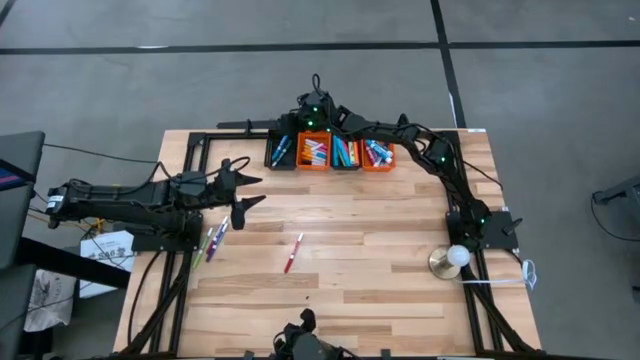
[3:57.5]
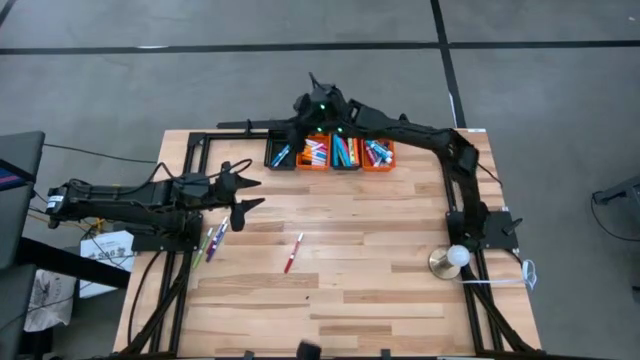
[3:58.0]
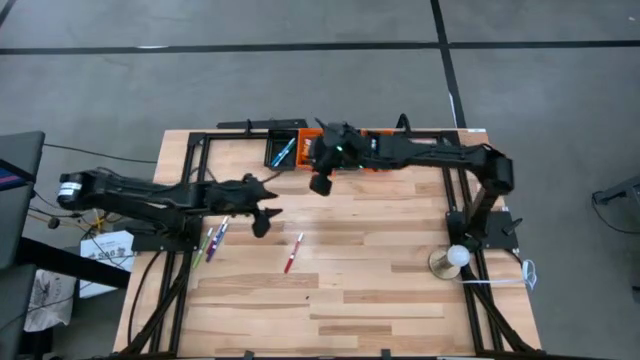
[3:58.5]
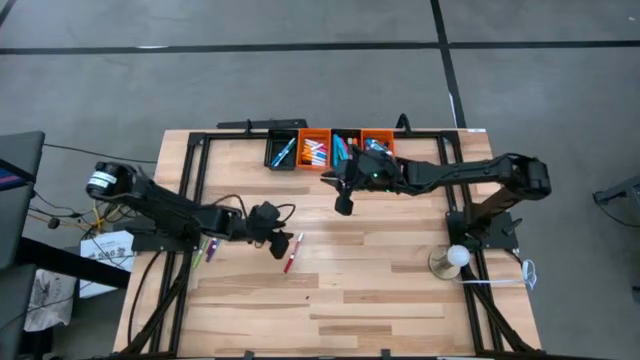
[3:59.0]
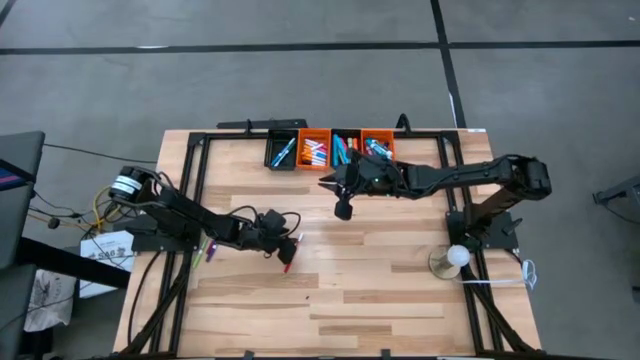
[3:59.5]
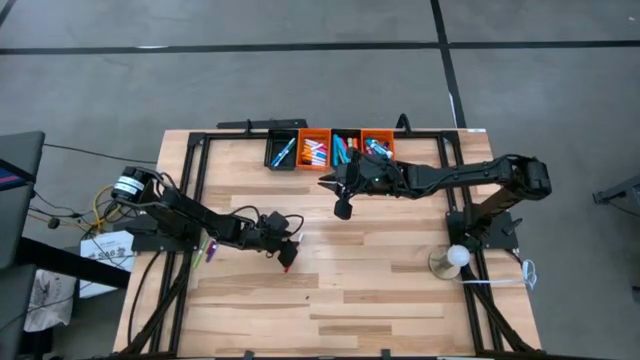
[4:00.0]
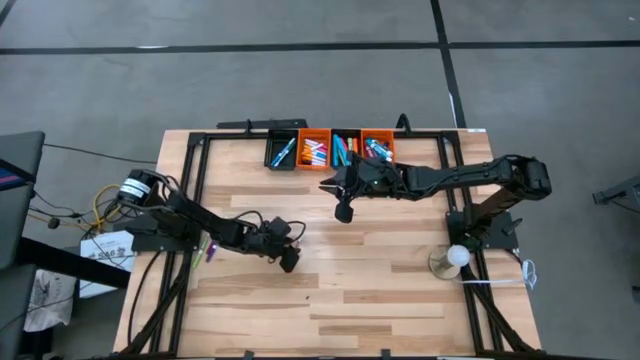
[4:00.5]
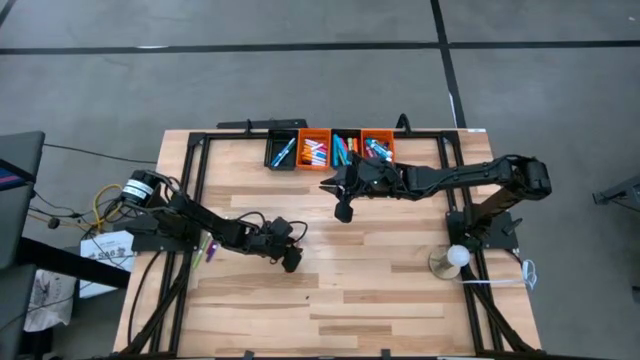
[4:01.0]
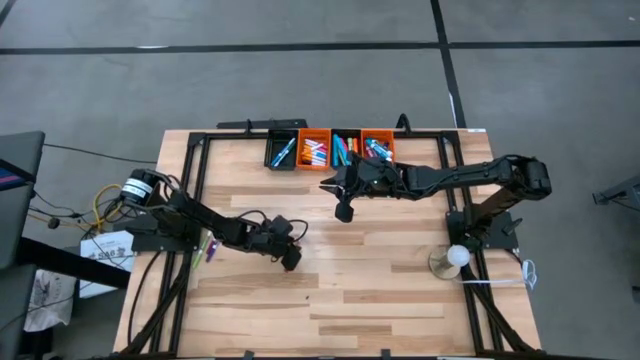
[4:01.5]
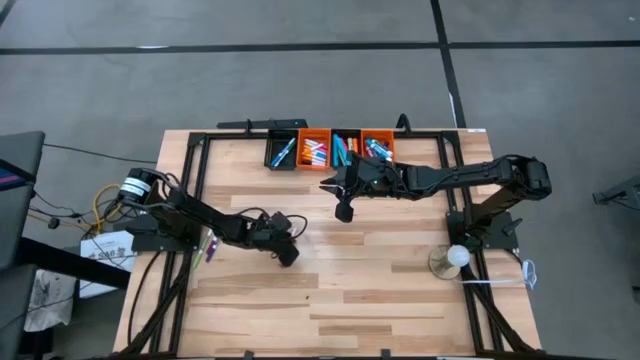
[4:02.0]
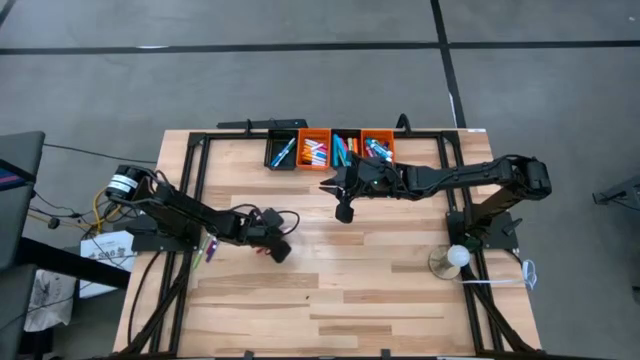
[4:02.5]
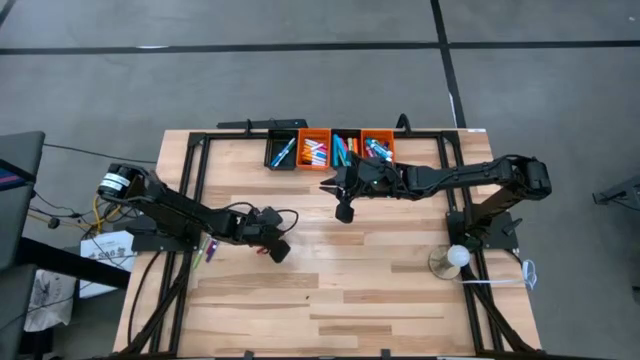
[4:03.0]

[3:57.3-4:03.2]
Task: Pick & Place Markers
Put the red and white marker pen into the left black bin

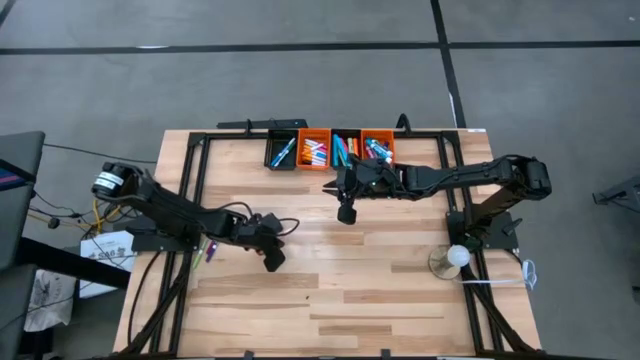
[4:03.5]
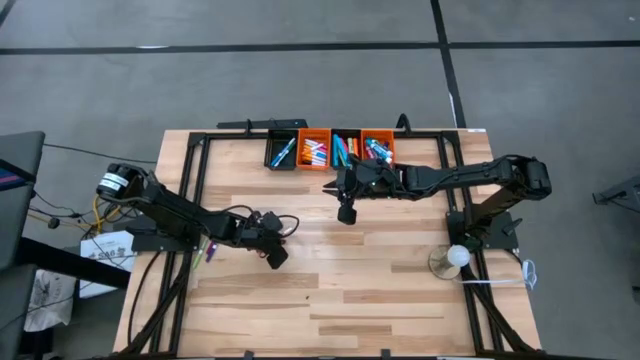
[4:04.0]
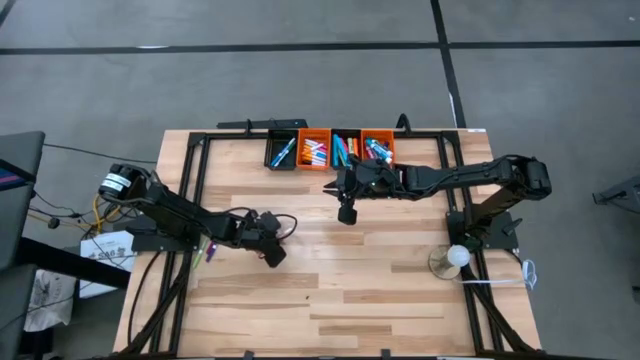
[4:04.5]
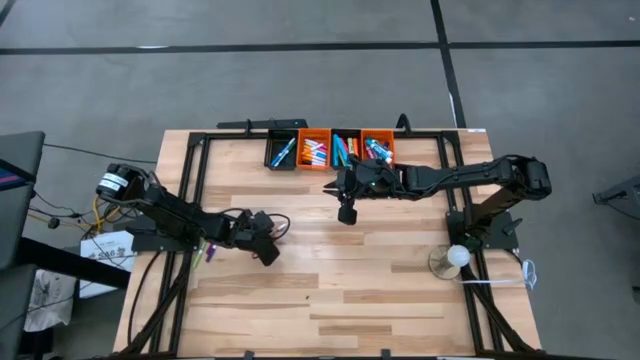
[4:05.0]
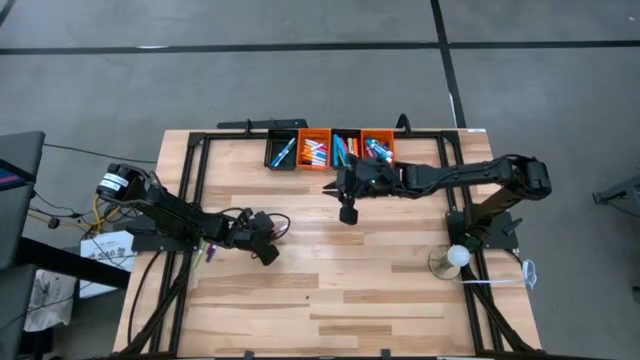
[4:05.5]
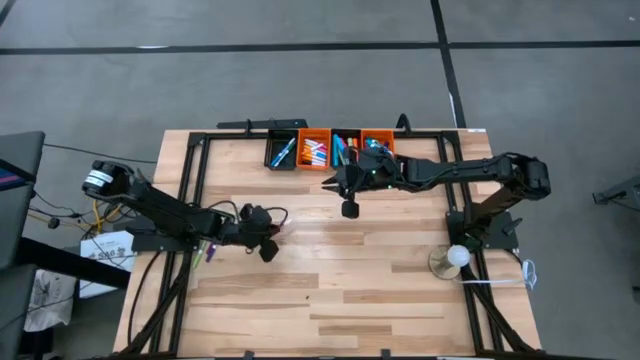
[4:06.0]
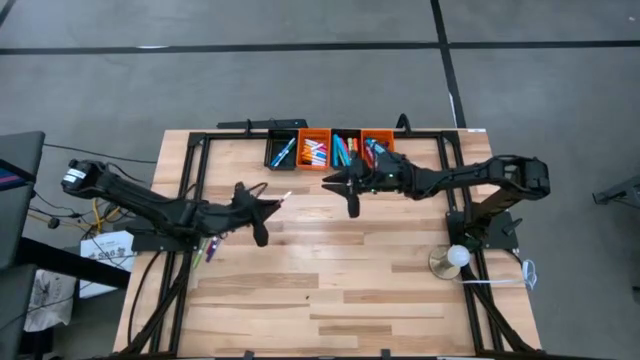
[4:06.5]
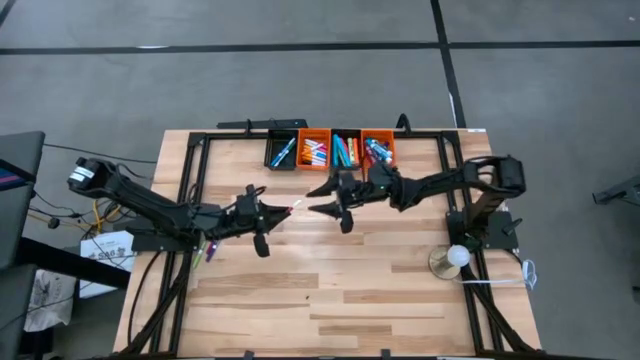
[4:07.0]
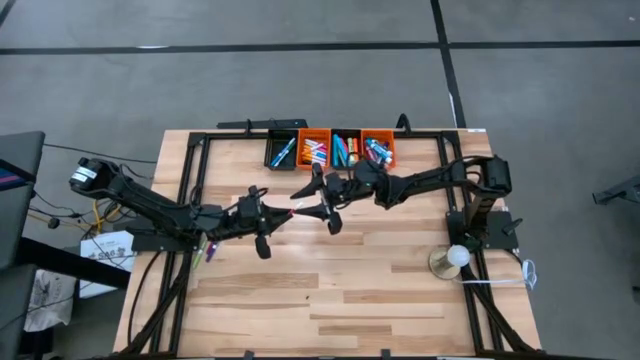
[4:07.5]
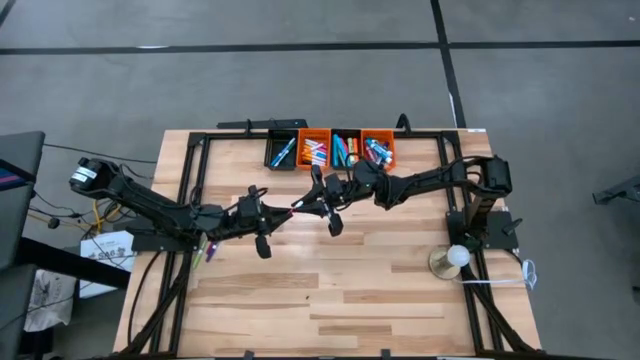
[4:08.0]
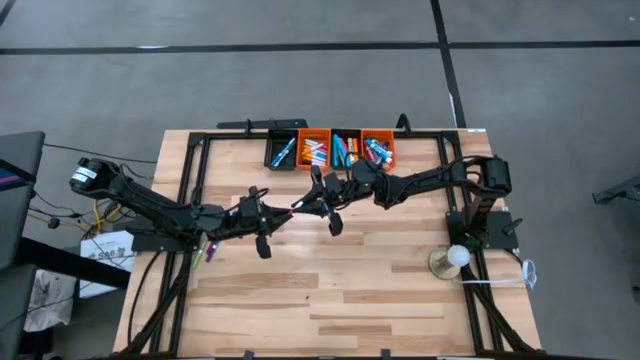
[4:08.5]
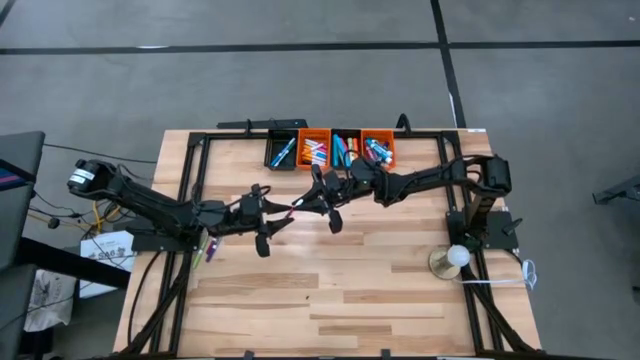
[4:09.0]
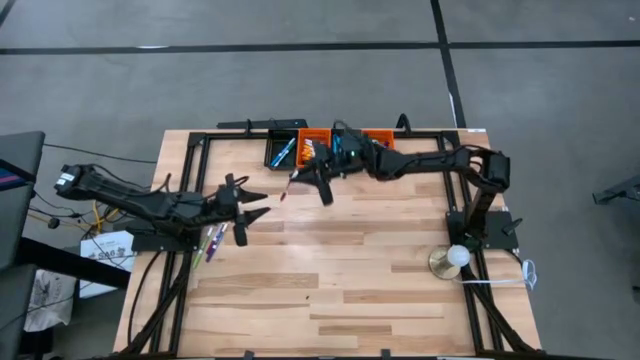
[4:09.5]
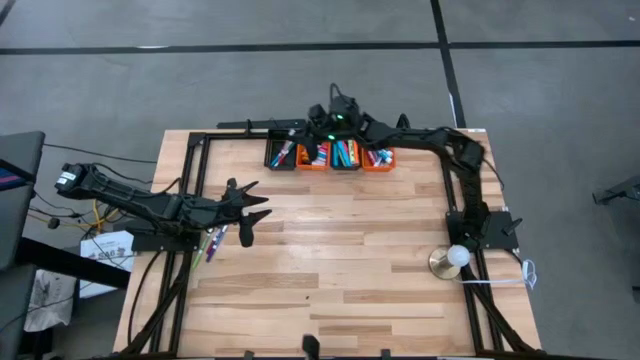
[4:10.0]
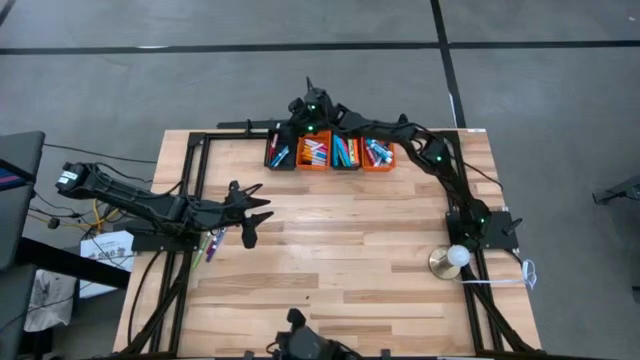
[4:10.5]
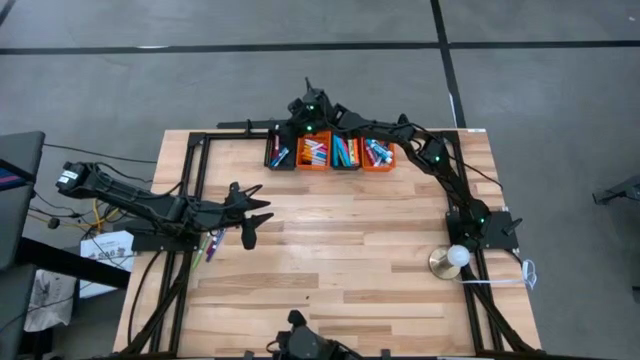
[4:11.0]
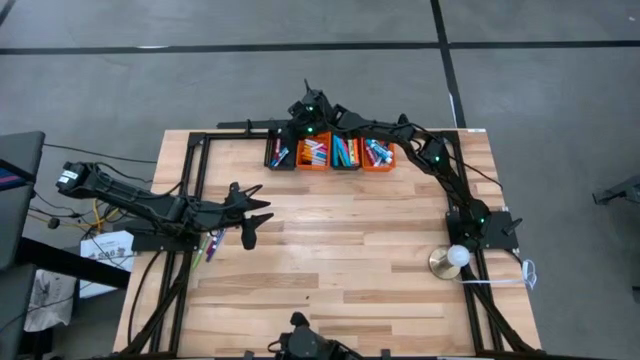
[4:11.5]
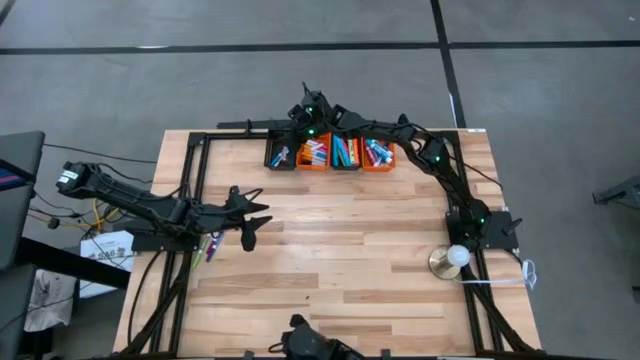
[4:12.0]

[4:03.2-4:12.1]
Put the red and white marker pen into the left black bin

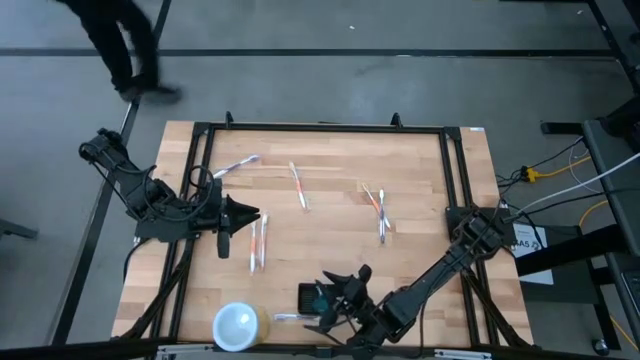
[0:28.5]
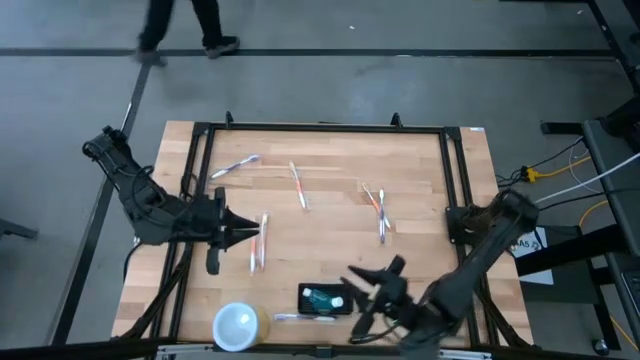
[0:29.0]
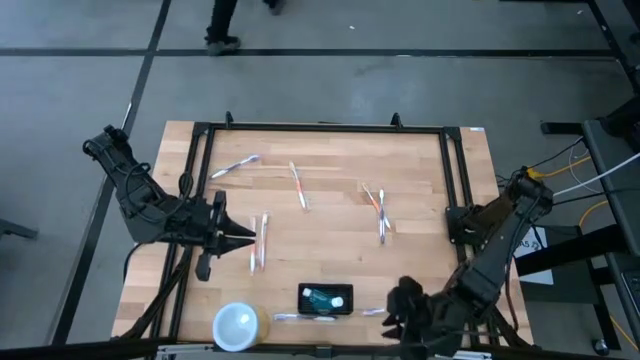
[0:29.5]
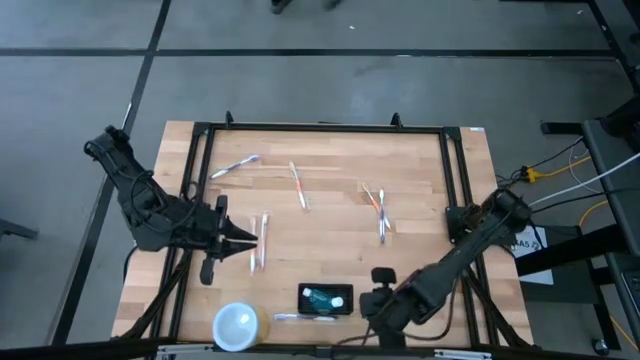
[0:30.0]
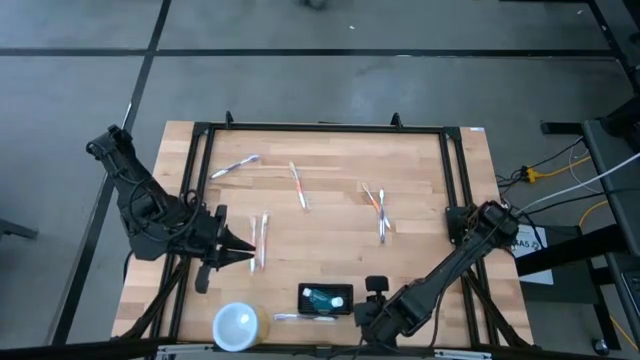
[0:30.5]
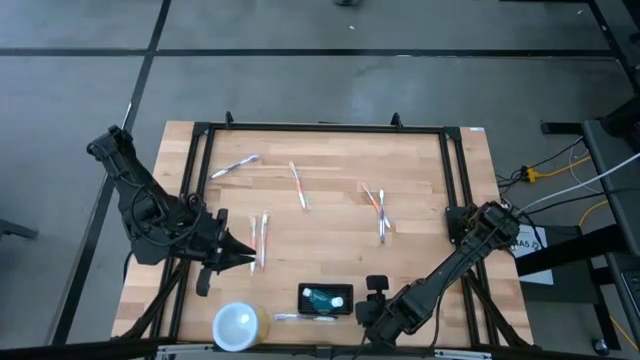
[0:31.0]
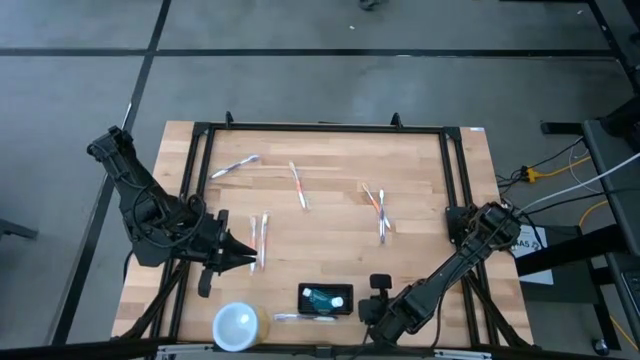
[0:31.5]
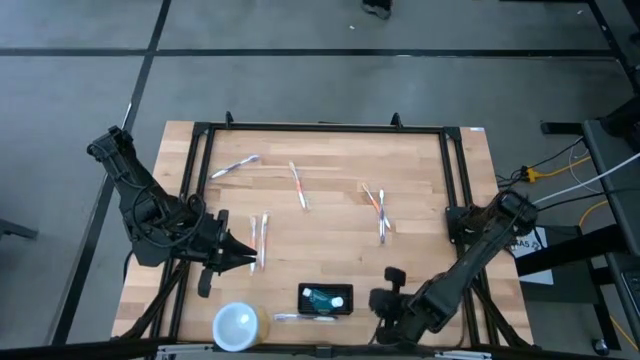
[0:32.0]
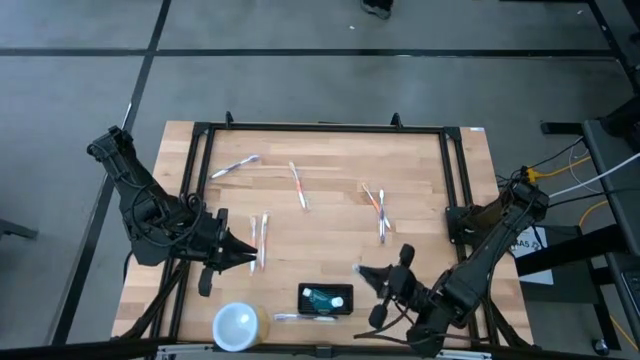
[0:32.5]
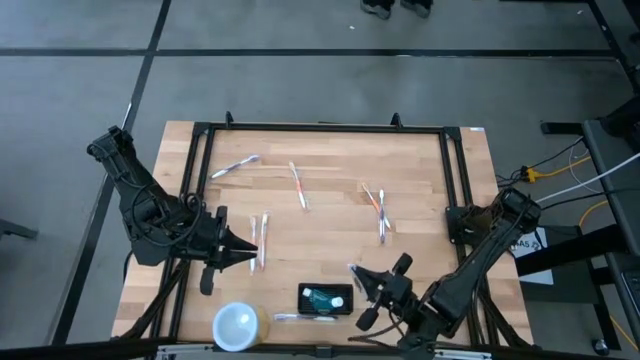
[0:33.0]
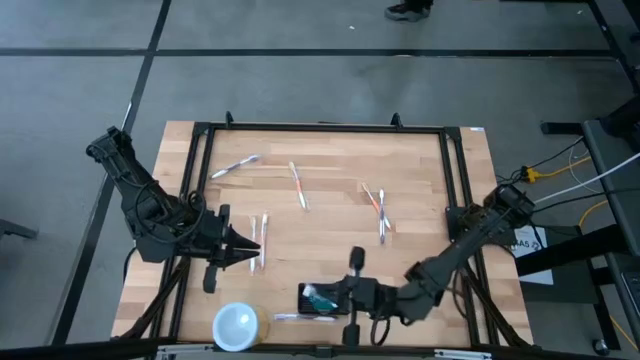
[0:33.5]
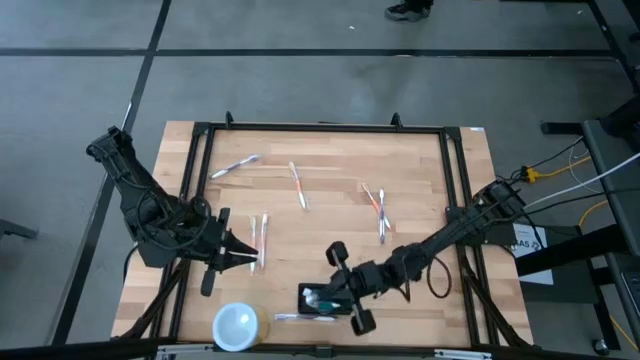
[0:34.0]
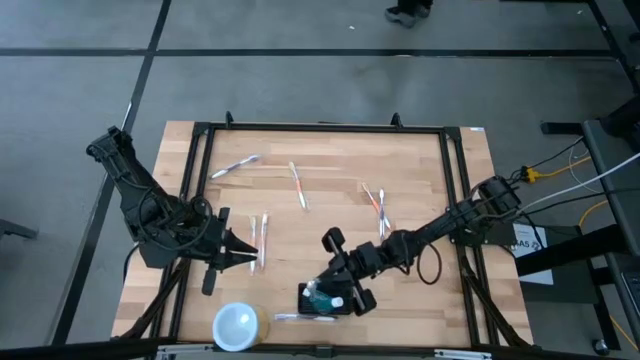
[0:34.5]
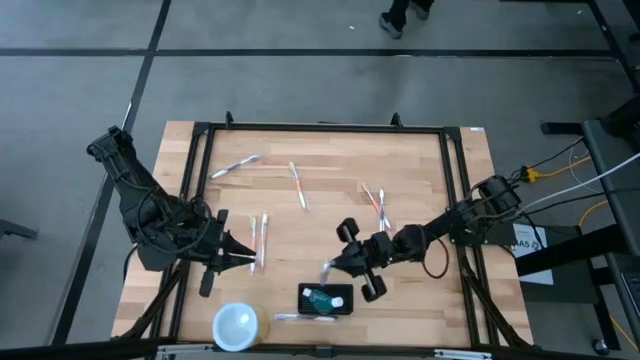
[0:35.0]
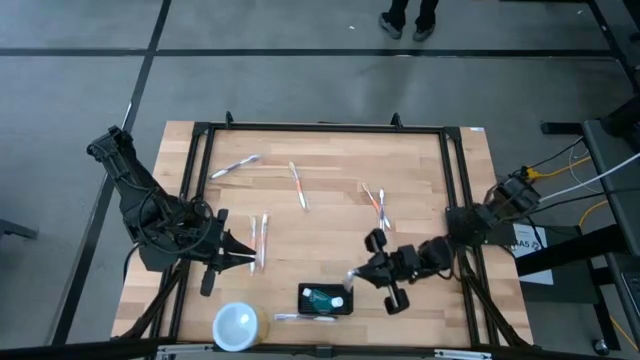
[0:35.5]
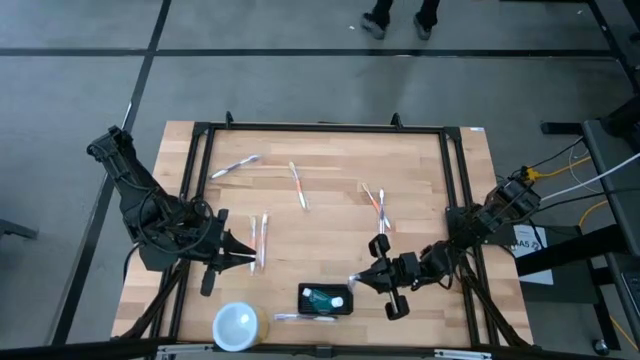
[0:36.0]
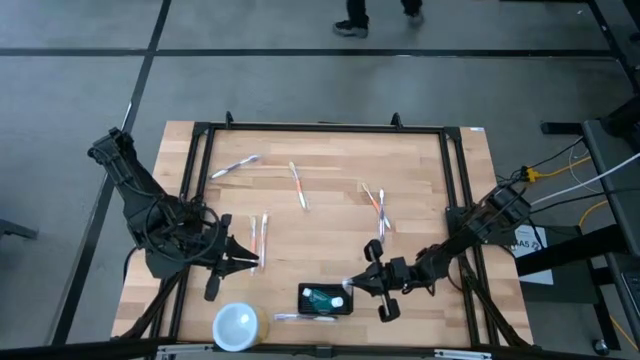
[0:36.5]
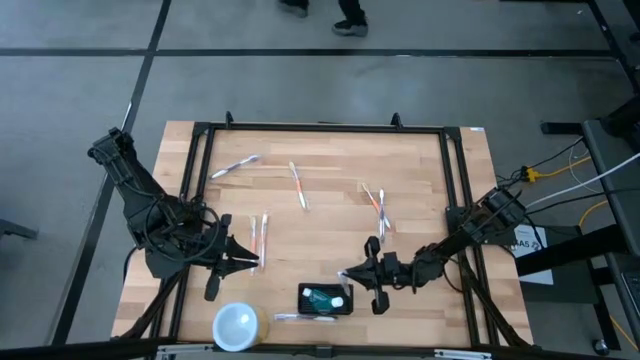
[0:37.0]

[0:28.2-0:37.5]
Task: Pick & Place toothbrushing station
Put the purple toothbrush into the mesh organizer
